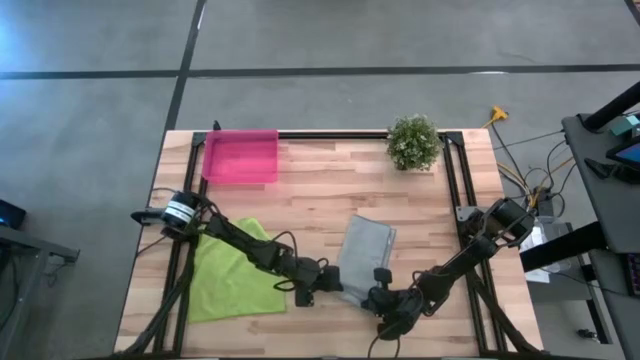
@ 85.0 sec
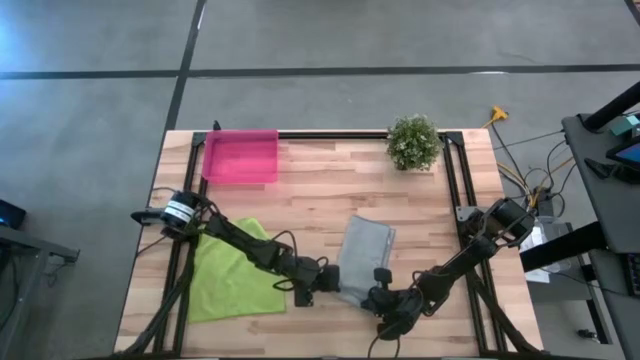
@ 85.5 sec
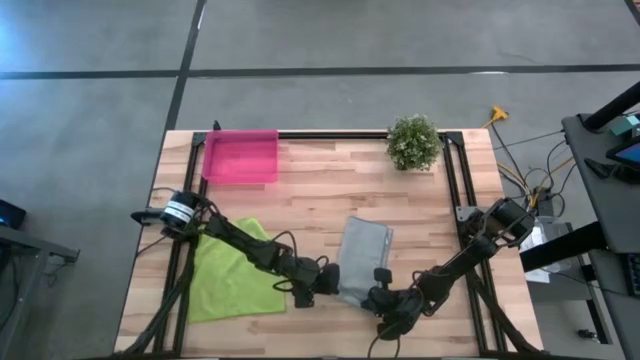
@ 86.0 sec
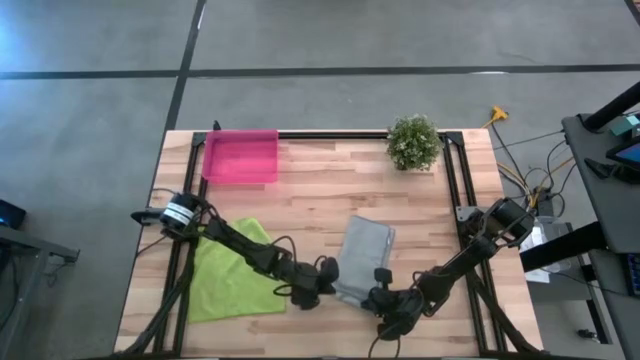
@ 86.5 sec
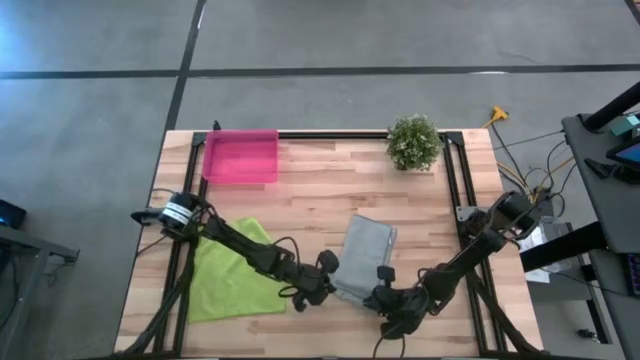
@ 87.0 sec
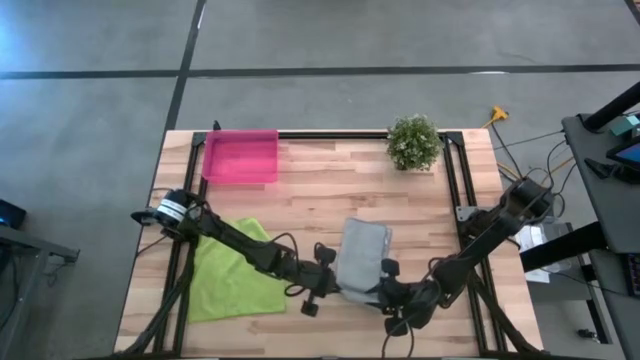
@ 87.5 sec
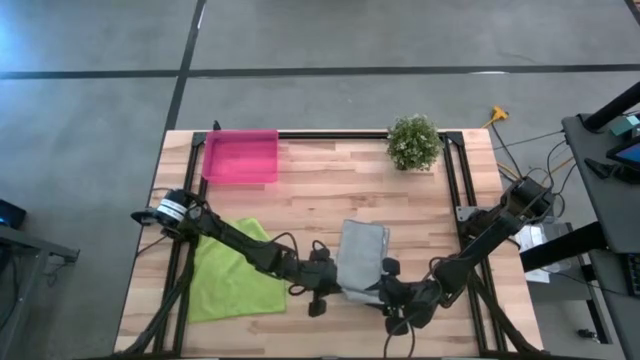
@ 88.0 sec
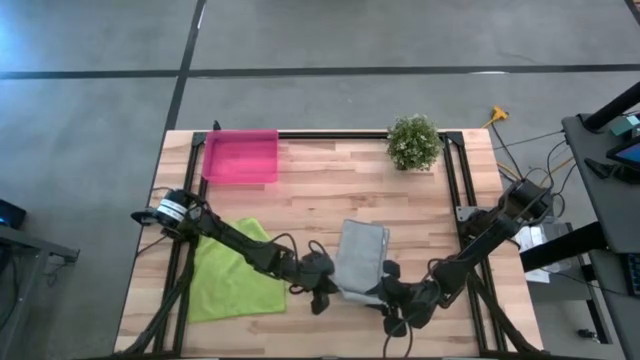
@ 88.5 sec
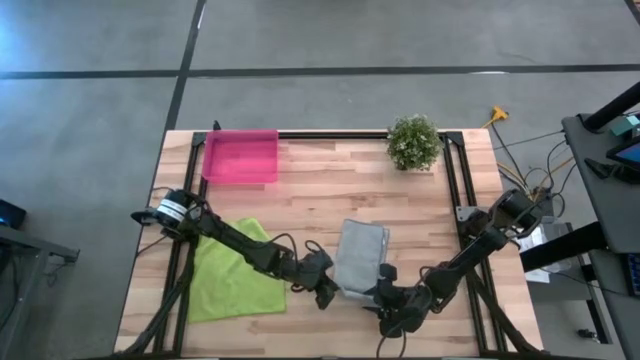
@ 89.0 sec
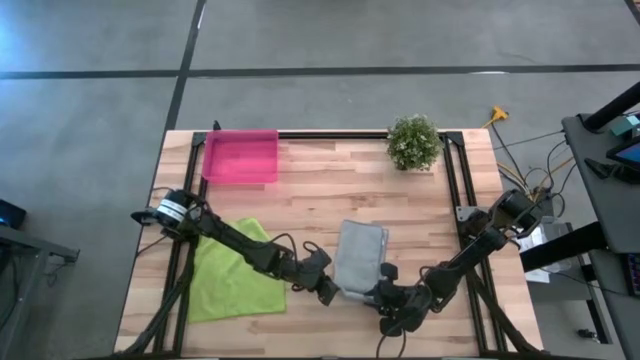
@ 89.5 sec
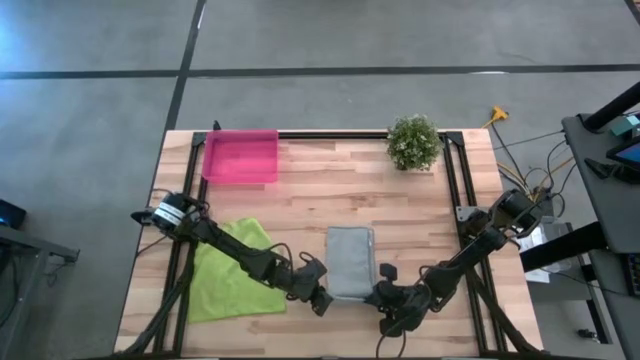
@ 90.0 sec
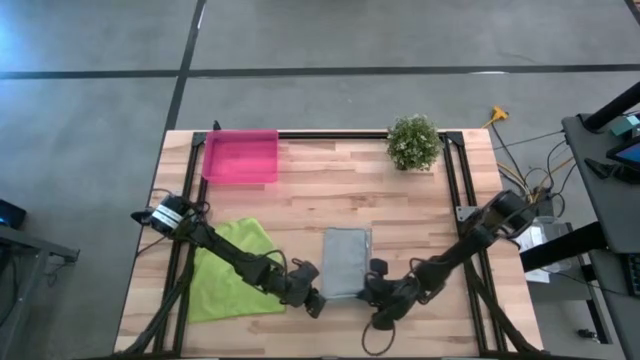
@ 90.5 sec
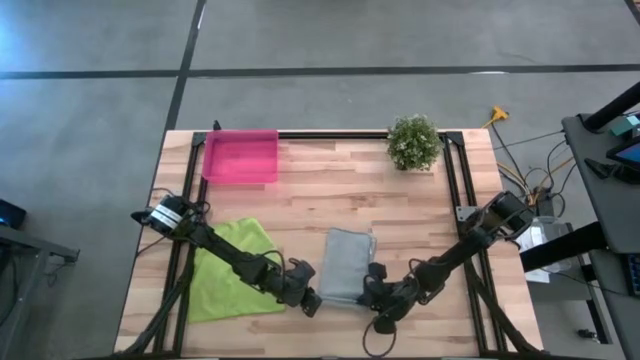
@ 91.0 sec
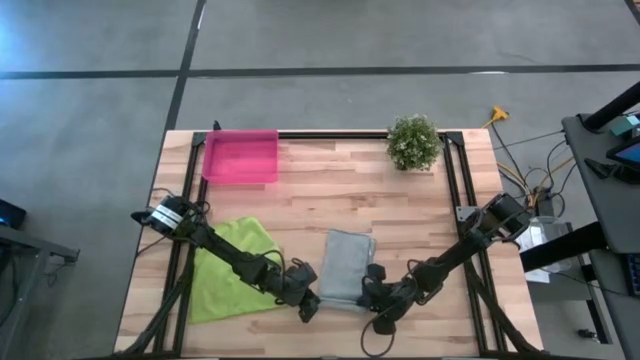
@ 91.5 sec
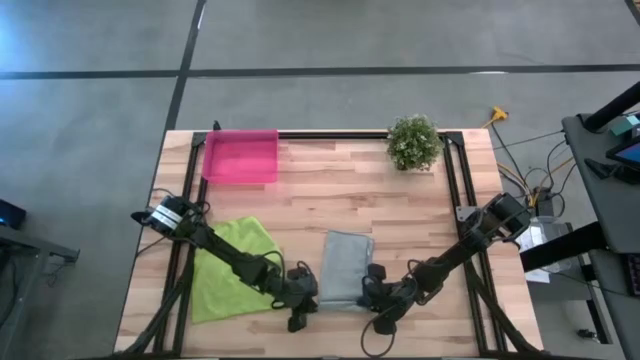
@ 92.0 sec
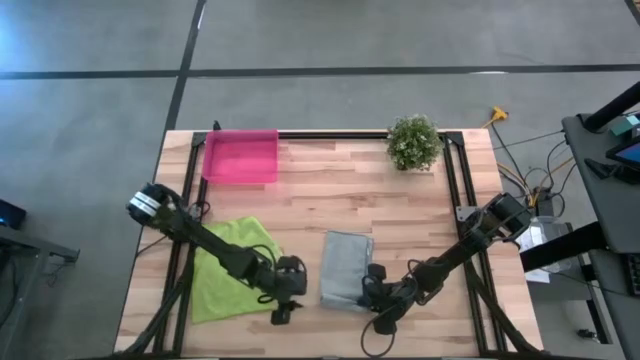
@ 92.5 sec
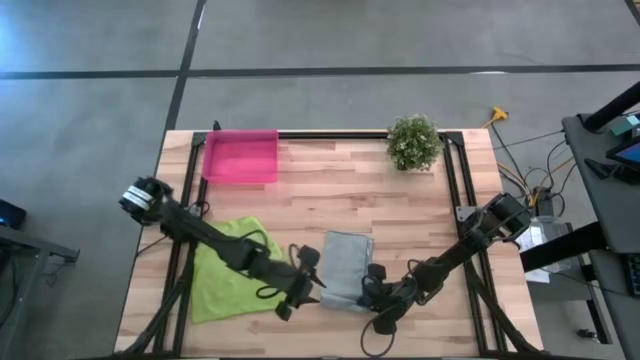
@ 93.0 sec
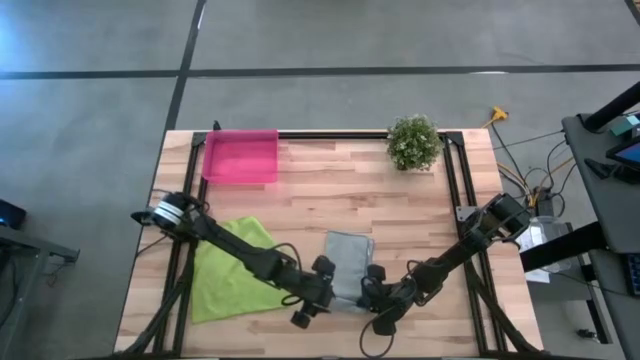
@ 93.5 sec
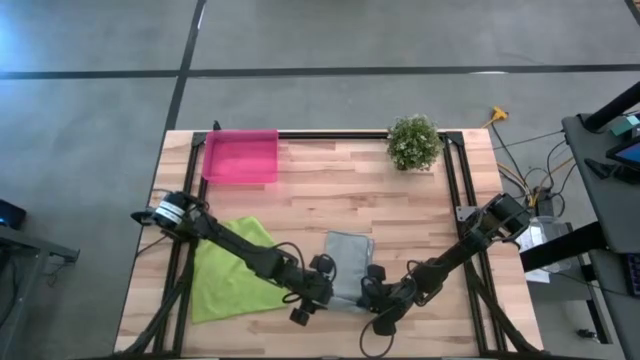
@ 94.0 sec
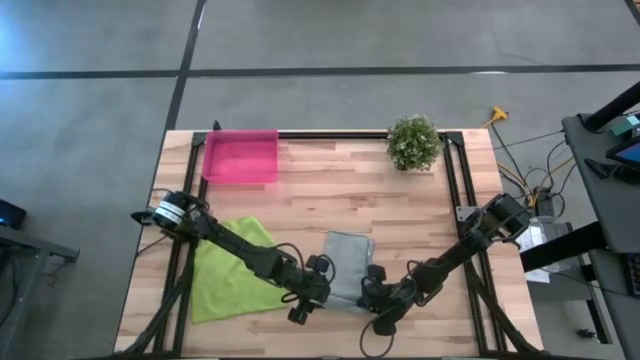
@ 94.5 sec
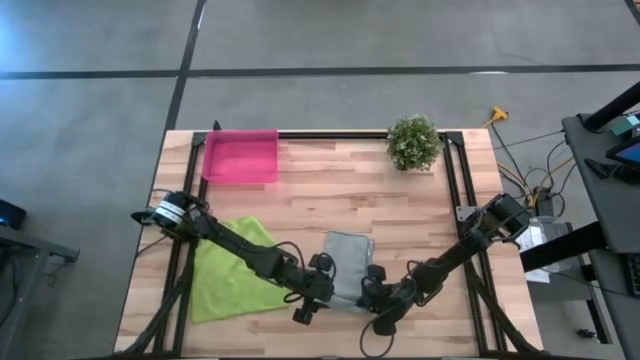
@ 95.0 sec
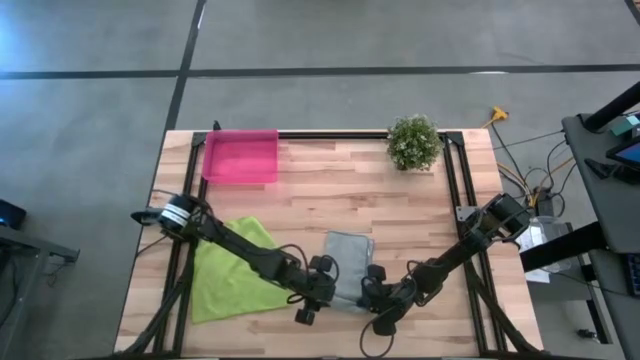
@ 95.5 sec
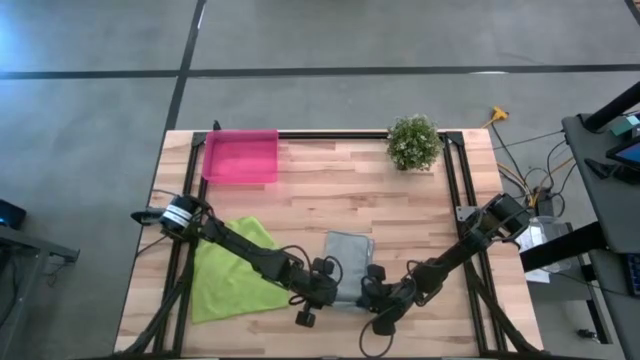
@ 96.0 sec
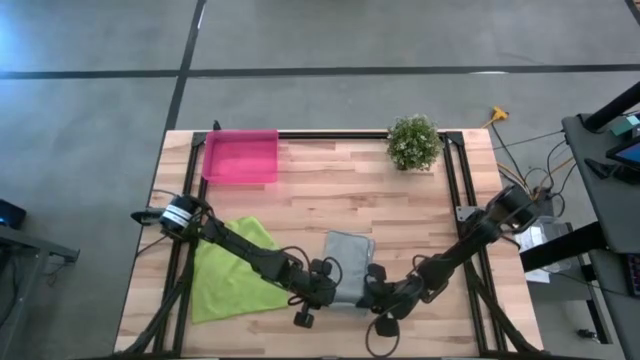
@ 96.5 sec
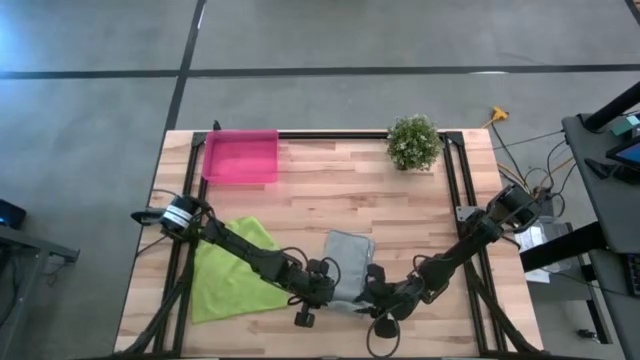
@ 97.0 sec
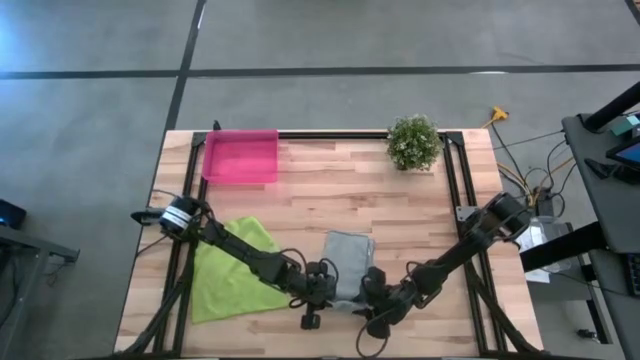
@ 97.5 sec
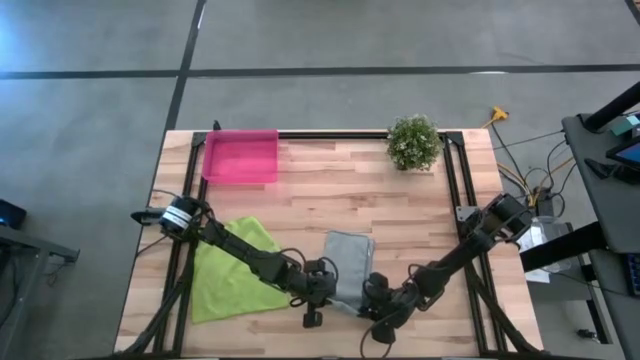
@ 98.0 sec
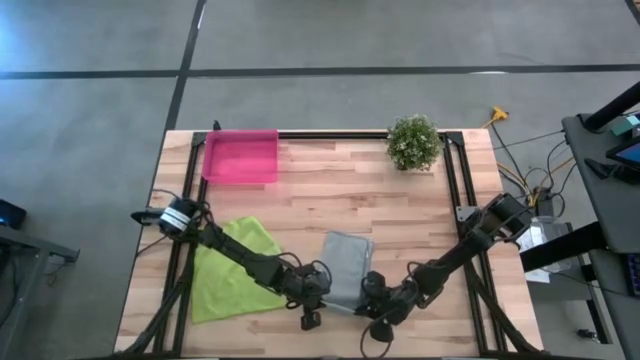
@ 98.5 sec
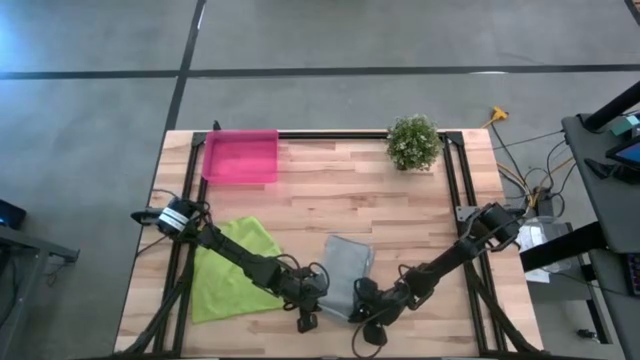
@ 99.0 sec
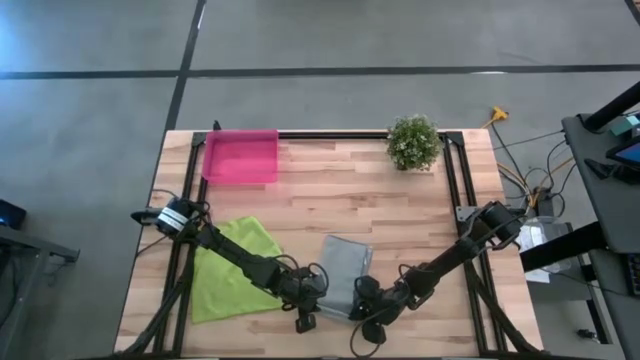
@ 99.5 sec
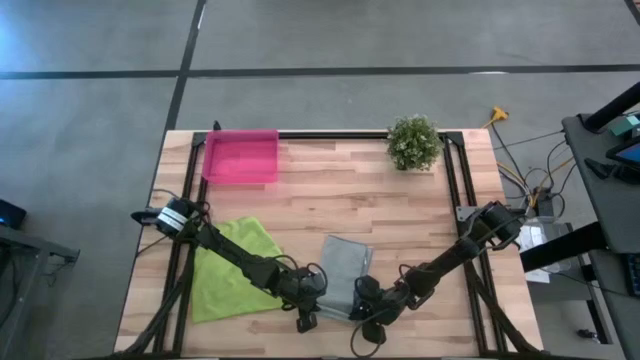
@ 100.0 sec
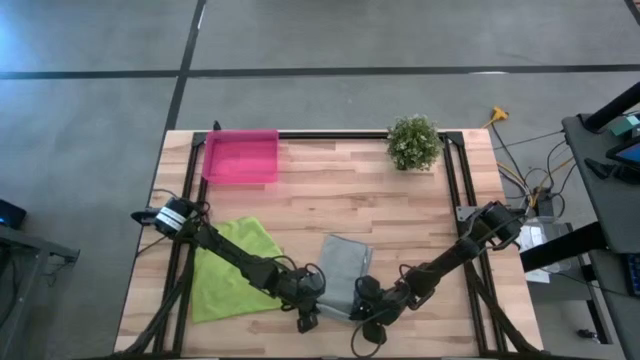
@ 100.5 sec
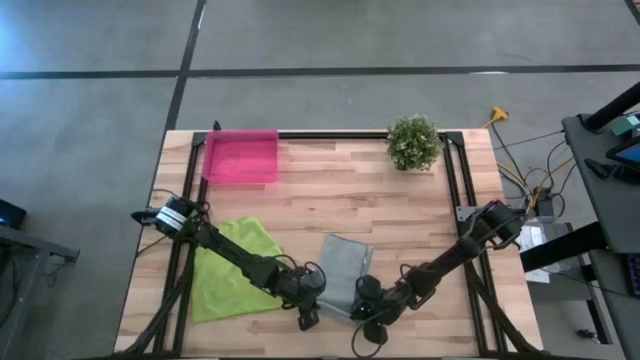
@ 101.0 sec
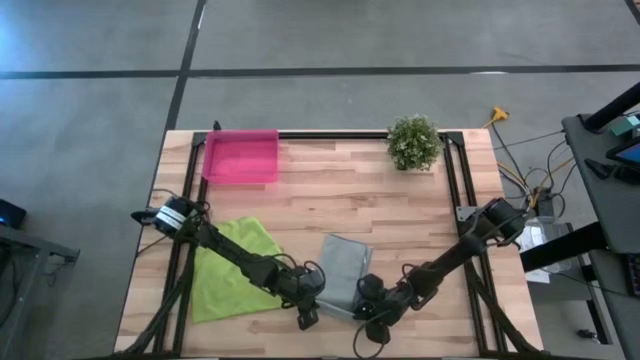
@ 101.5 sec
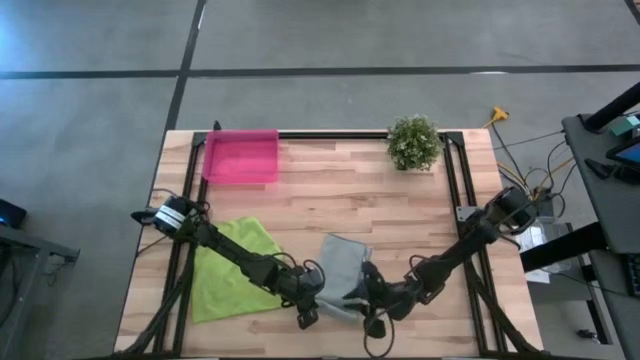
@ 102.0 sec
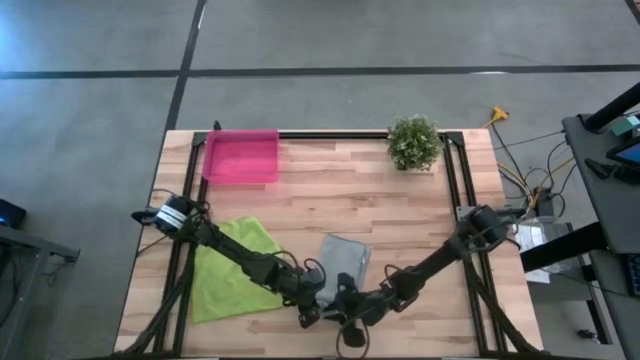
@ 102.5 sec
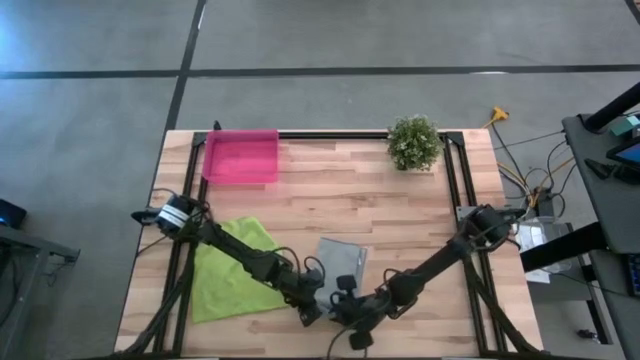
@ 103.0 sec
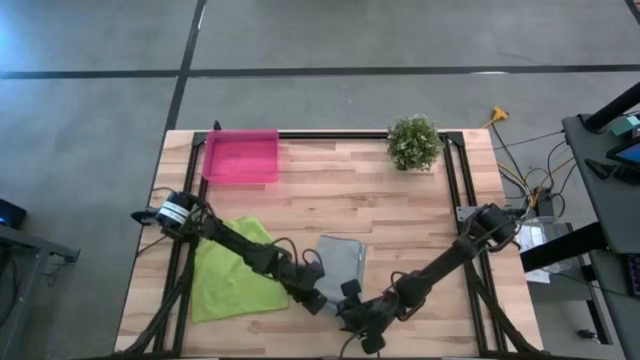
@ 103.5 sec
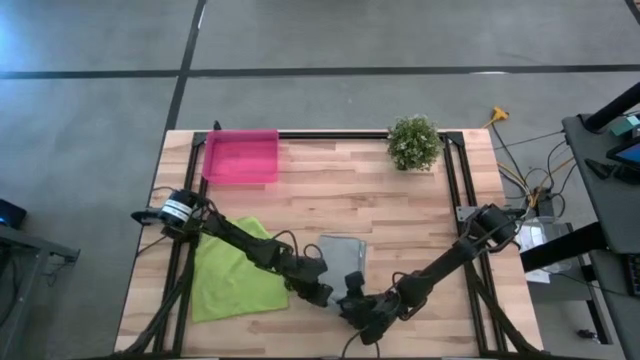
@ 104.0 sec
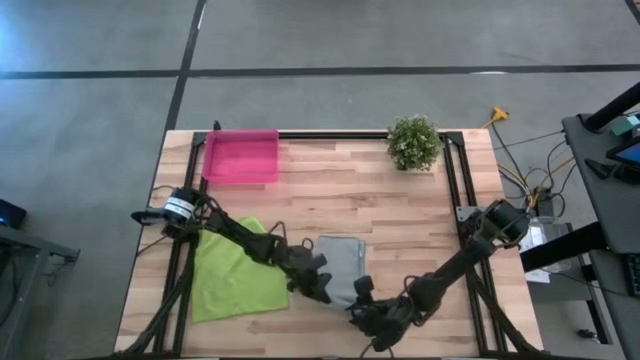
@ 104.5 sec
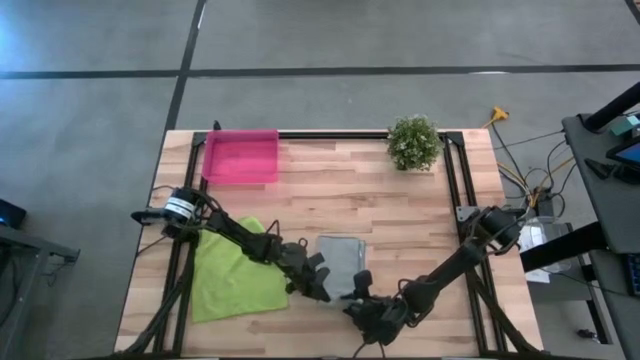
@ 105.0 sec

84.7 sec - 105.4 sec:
Task: Roll microfiber towels into tight, uniform cylinder then place into a basket
Roll the blue microfiber cloth

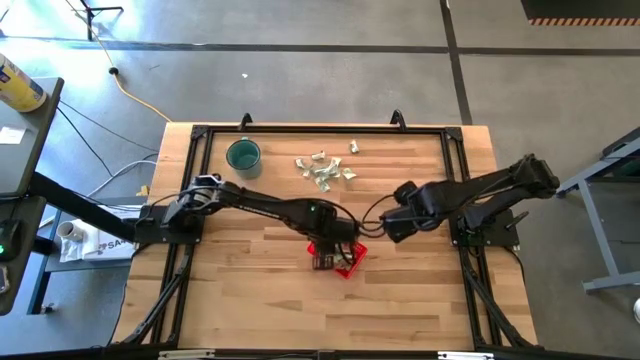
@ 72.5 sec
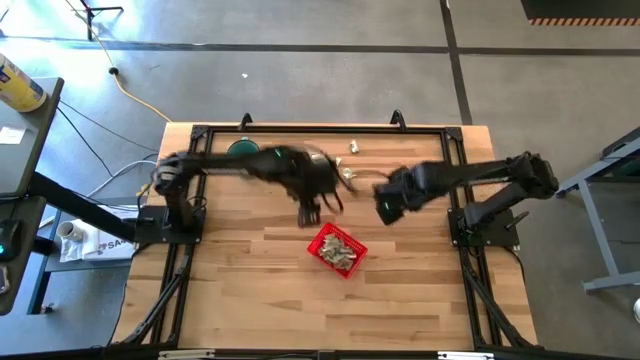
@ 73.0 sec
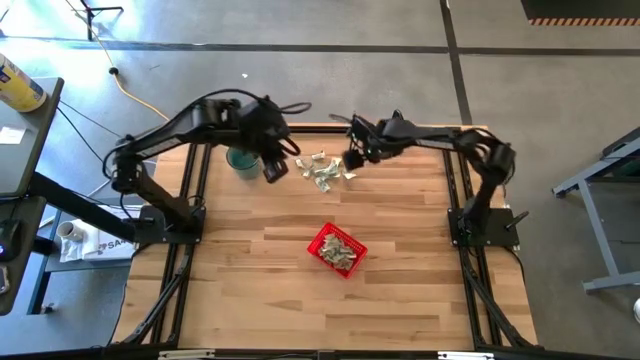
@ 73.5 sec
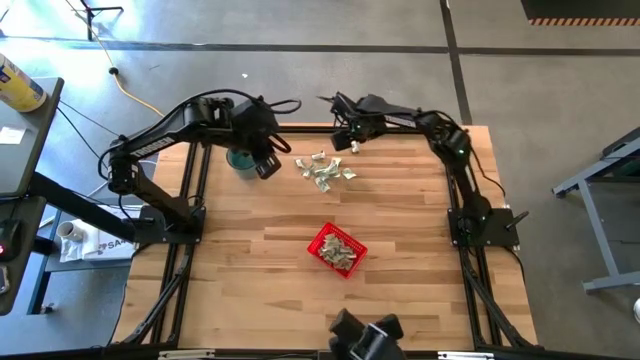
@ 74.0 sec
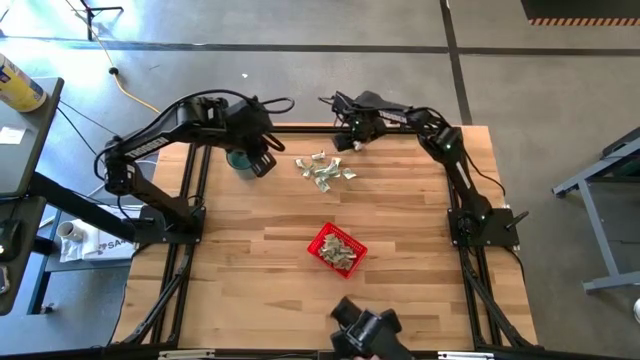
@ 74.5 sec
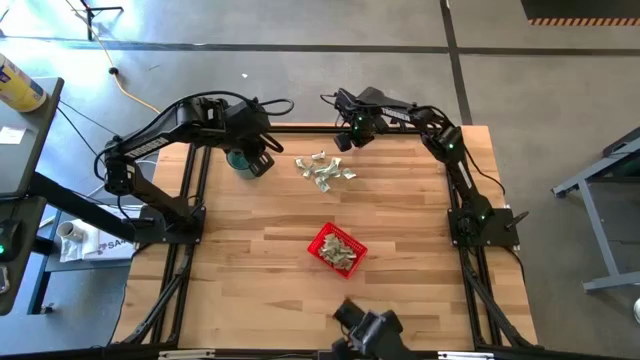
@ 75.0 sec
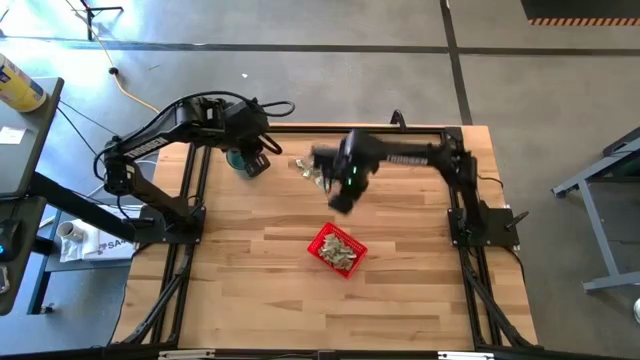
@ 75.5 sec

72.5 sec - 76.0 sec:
Task: Pick and place Stevia / Truvia into bins
Put the right green stevia packet into the bin
